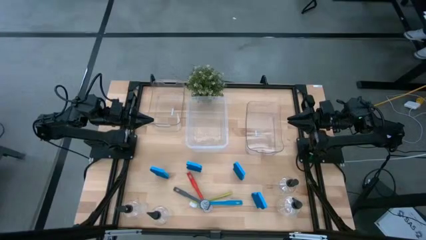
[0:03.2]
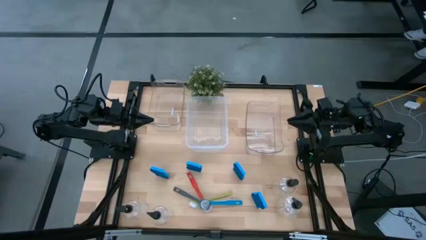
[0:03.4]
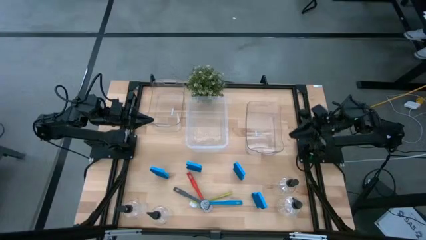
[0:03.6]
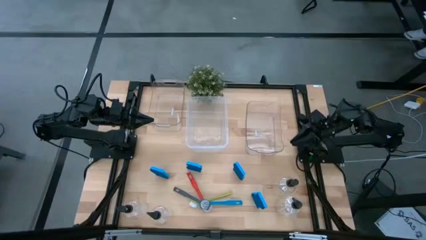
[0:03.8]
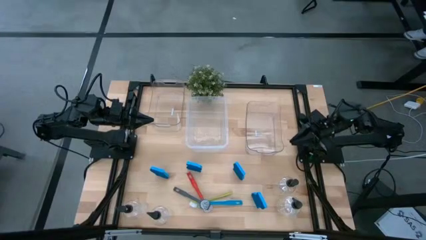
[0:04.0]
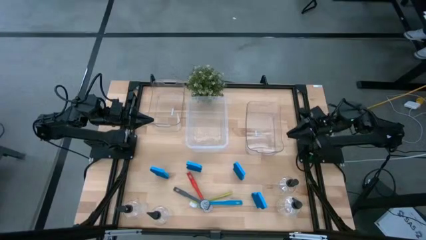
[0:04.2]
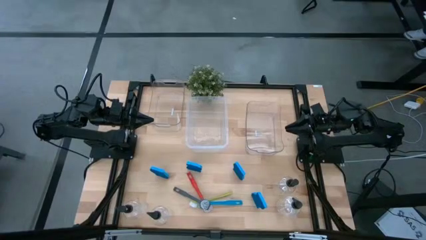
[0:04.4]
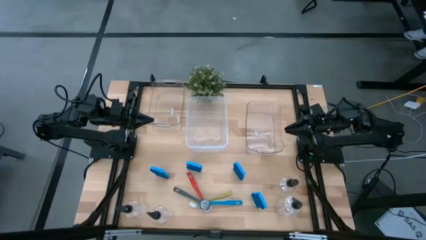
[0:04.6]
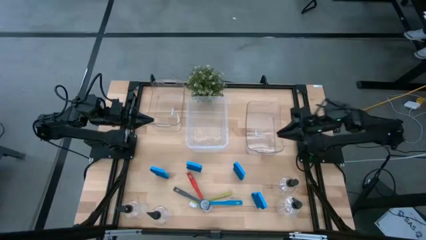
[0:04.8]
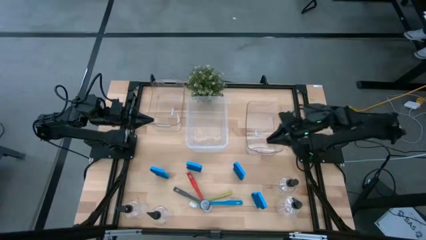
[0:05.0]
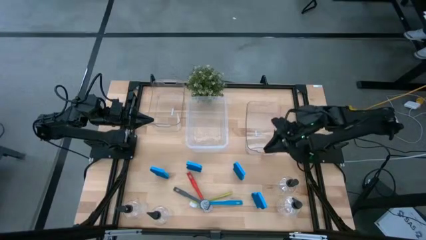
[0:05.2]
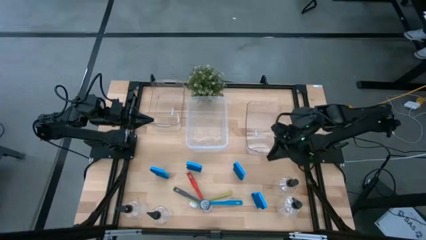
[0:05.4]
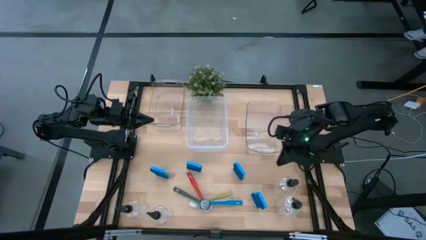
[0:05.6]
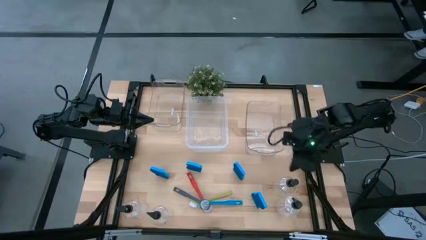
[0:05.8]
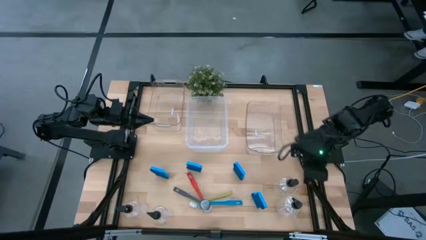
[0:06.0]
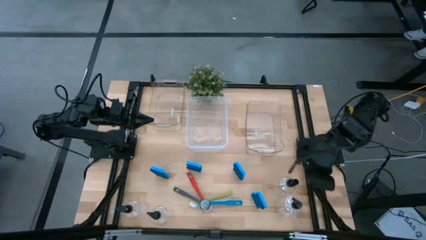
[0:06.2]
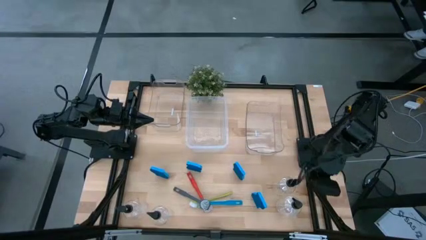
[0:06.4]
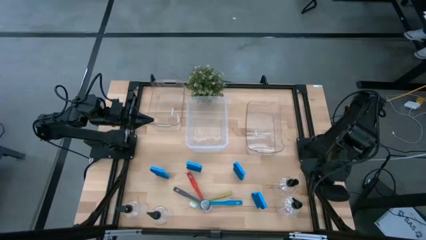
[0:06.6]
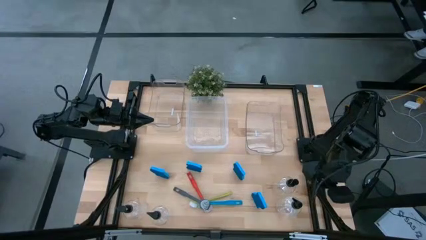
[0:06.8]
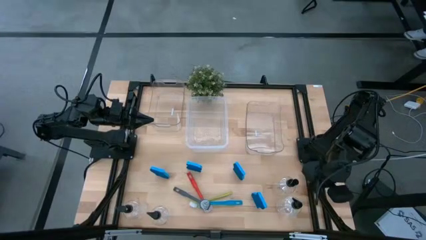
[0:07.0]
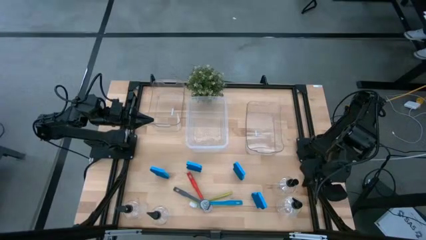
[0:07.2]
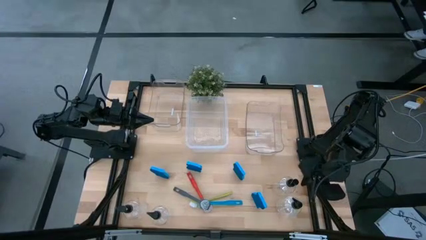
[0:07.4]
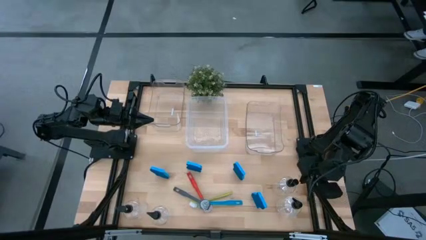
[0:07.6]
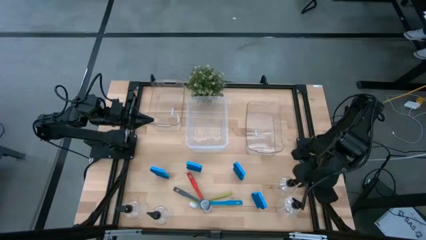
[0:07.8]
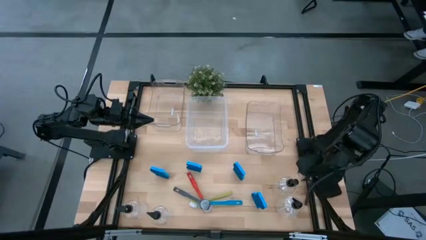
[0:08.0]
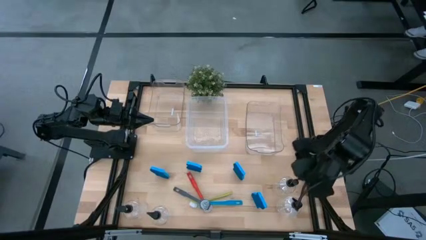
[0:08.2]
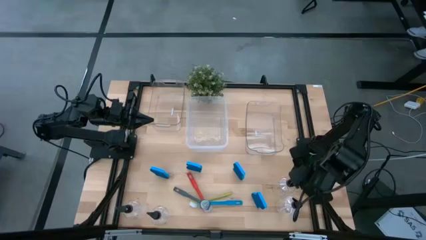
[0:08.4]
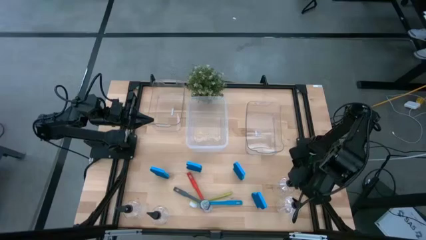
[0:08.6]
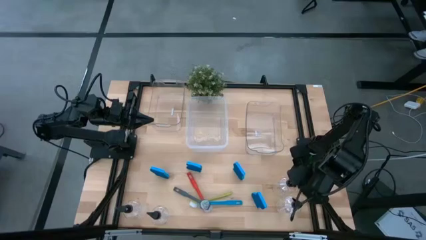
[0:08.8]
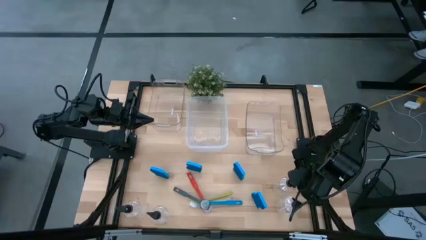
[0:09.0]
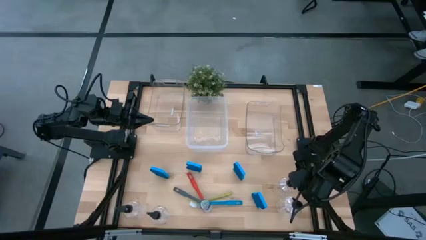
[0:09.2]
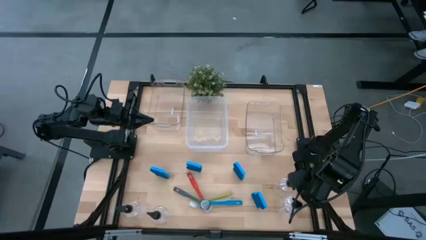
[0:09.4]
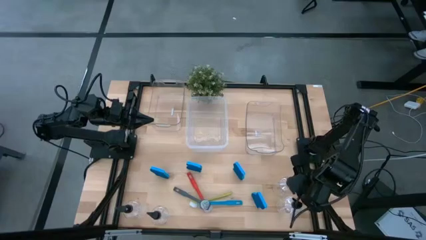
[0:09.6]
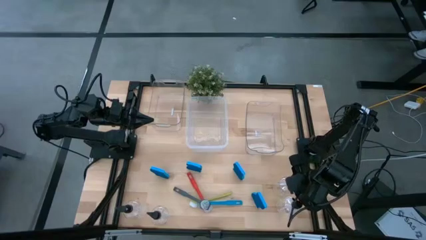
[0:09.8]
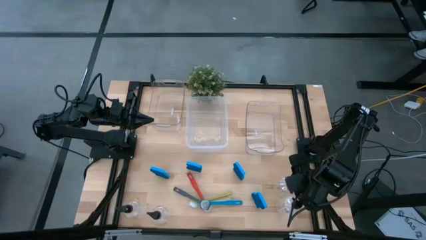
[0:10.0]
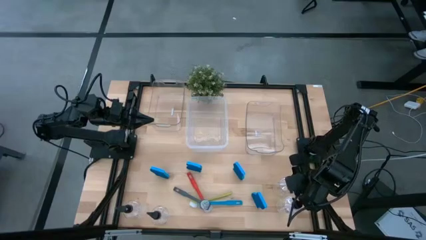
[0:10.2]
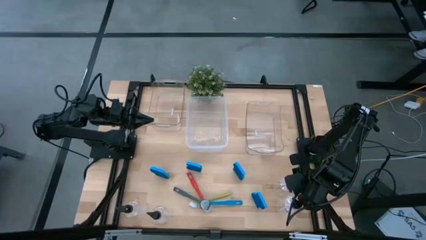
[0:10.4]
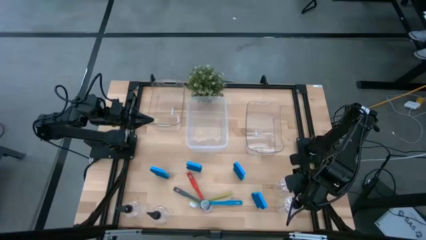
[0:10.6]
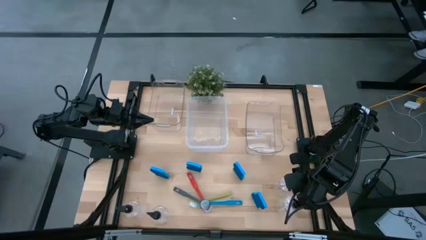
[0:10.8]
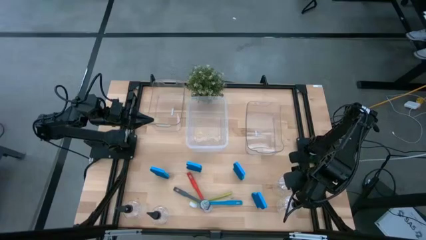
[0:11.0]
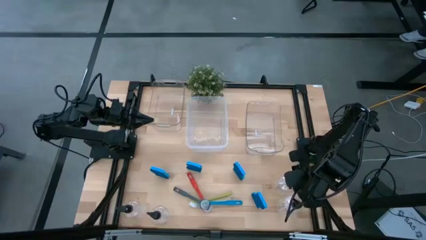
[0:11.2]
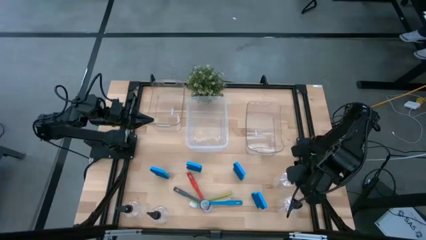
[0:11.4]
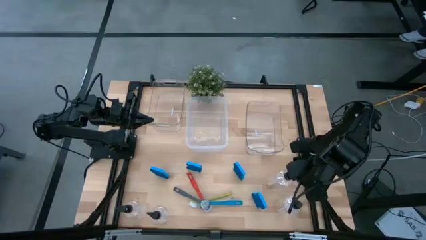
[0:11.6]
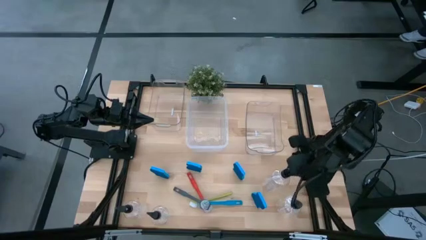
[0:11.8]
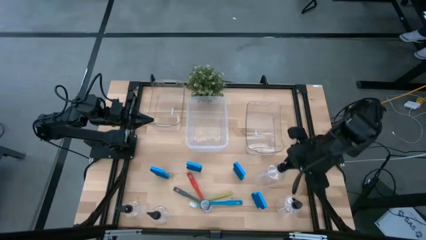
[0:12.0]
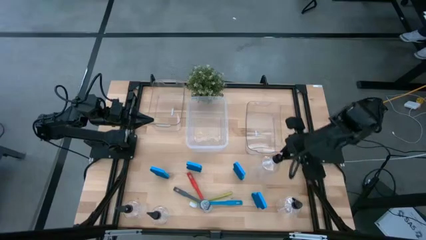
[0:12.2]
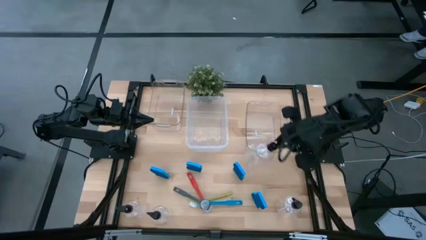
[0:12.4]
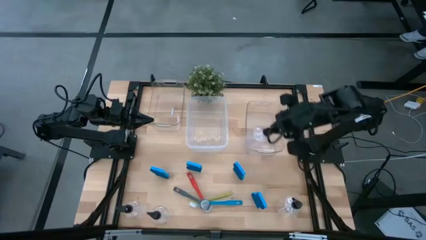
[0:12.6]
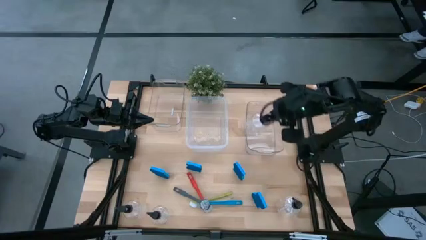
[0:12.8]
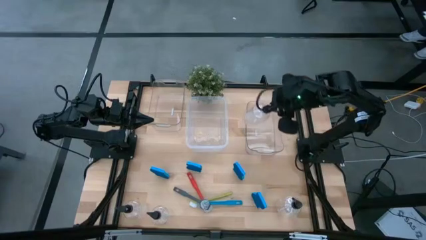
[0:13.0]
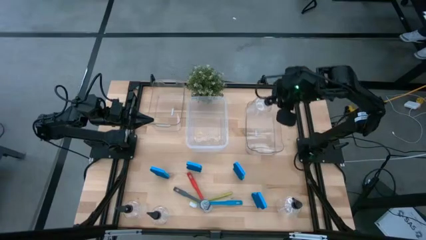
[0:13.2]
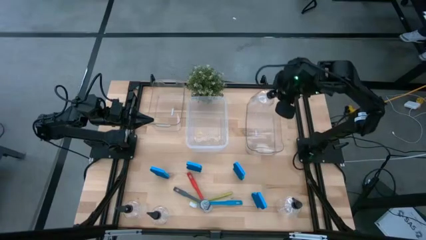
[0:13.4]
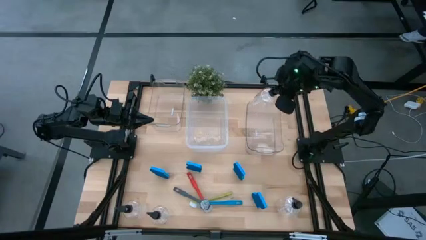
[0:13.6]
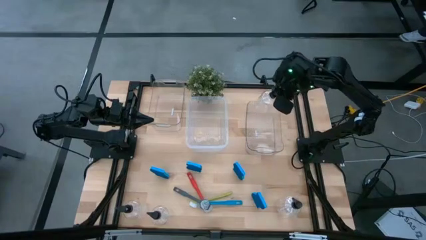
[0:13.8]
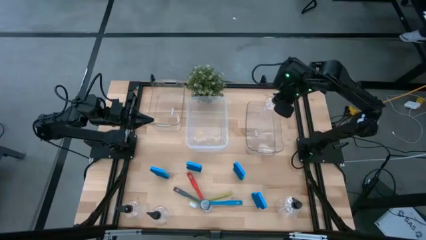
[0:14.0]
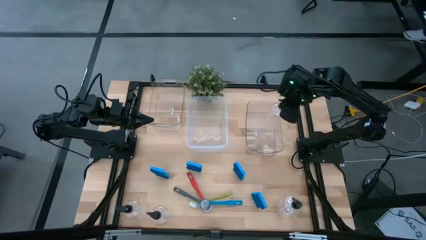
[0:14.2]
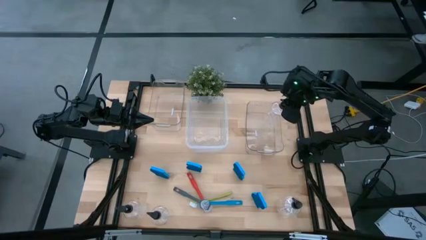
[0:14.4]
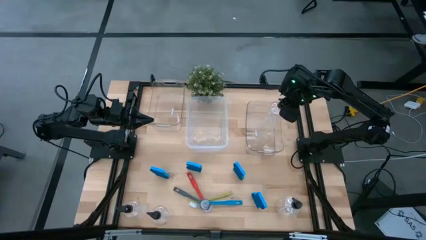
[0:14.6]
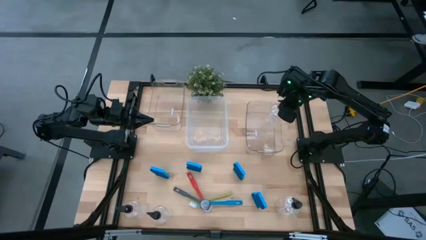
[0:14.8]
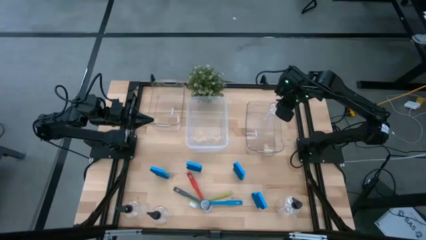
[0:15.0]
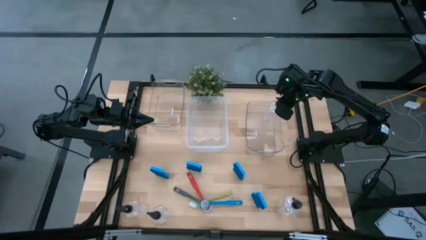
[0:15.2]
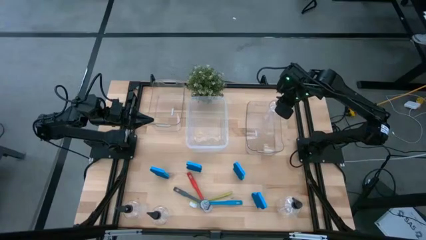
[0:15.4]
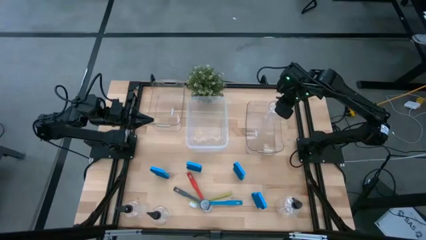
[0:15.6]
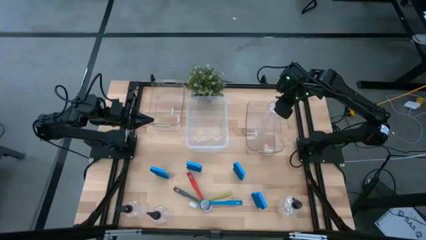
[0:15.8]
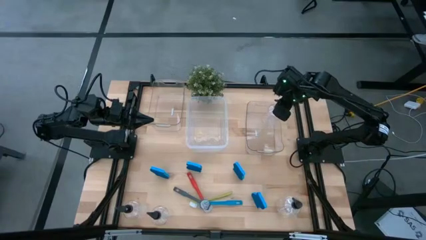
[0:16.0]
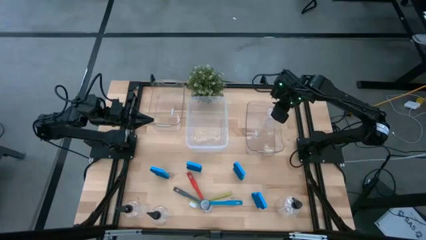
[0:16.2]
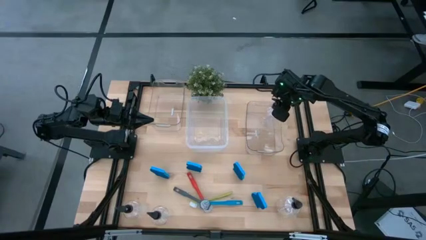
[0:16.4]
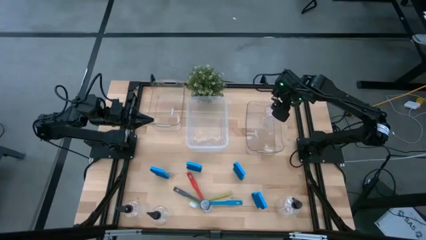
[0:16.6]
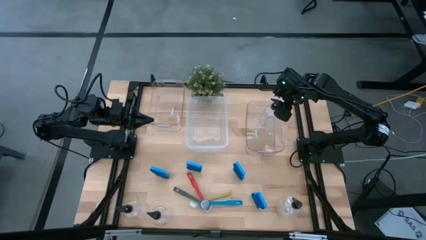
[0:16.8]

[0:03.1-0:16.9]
Task: Pick & Place Kitchen Sink Supplies
Put the transparent bottle into the right transparent bin
